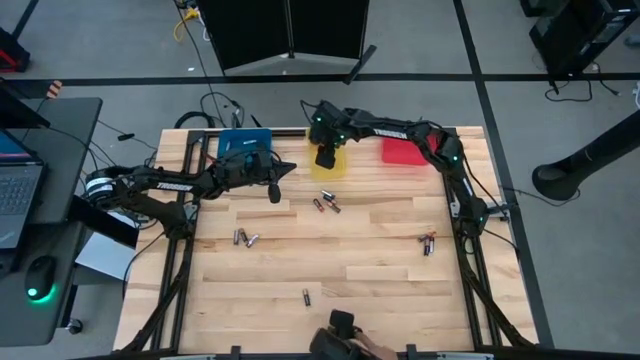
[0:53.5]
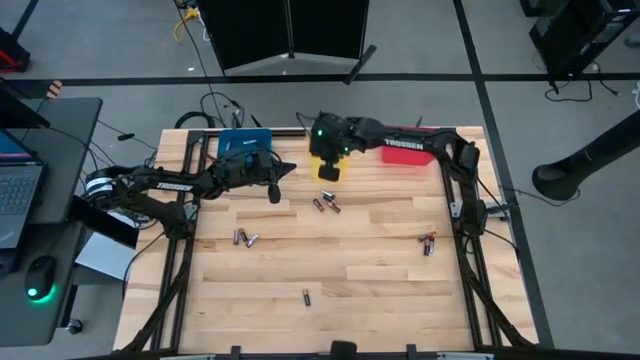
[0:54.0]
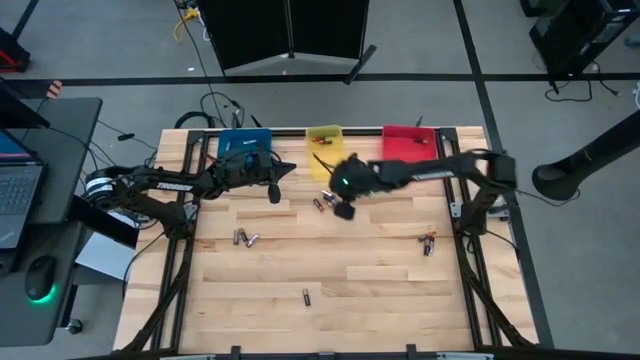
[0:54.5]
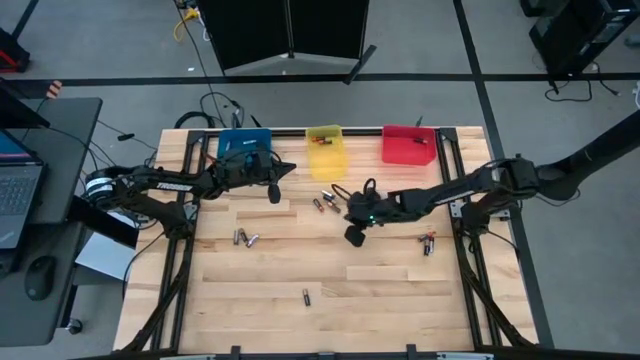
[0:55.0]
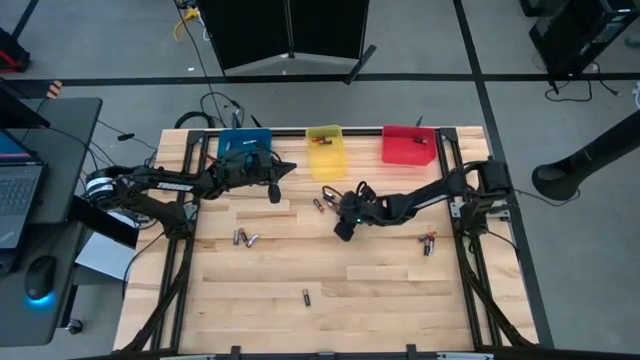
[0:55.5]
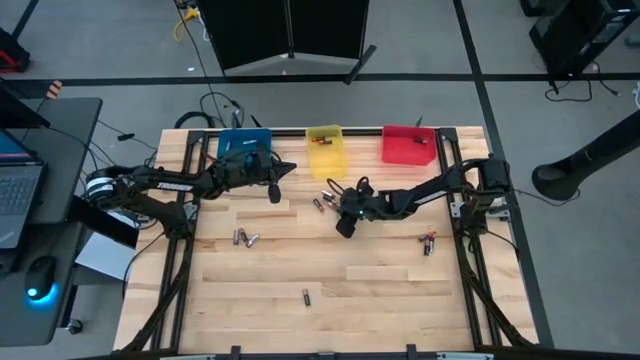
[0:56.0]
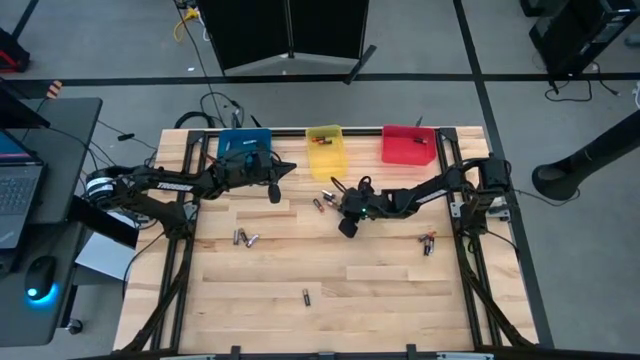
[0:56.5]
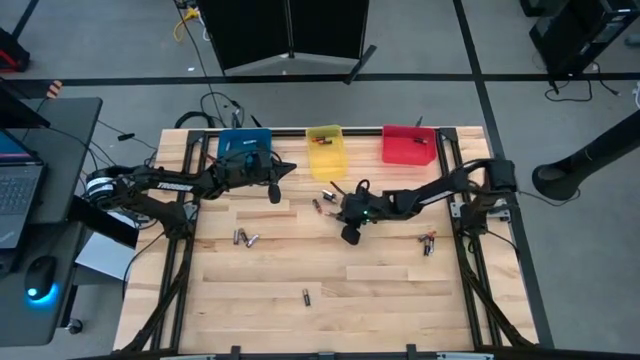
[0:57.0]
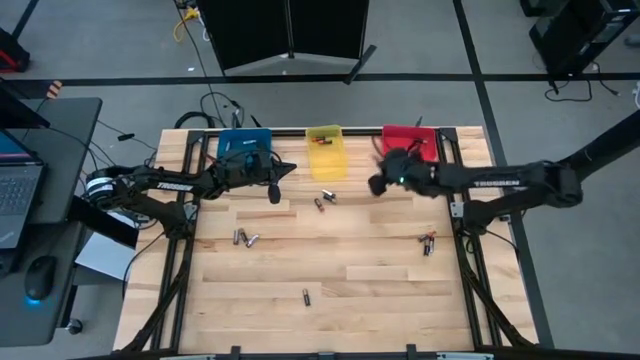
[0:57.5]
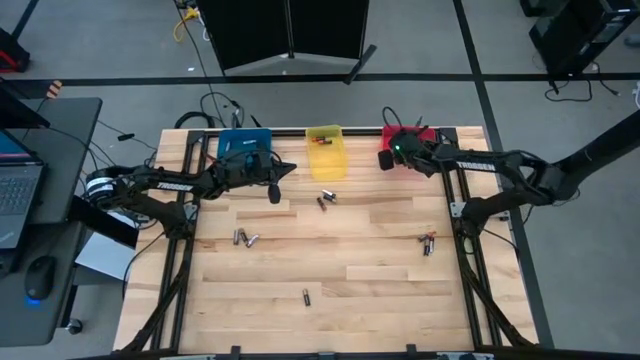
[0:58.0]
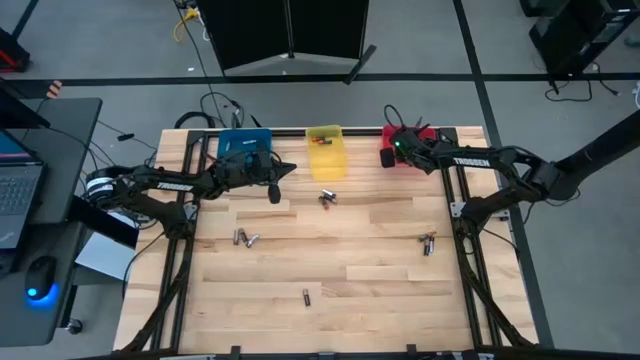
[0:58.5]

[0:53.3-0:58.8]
Task: Sort batteries
Put the black brown battery into the red bin

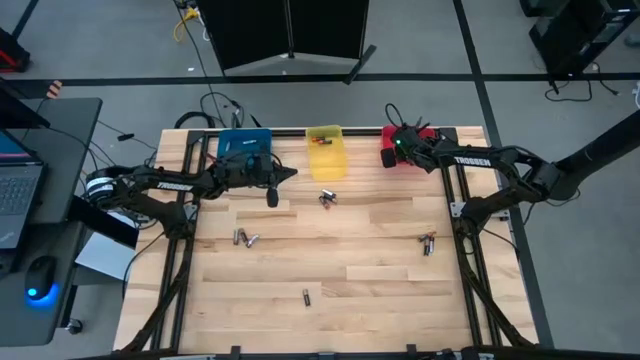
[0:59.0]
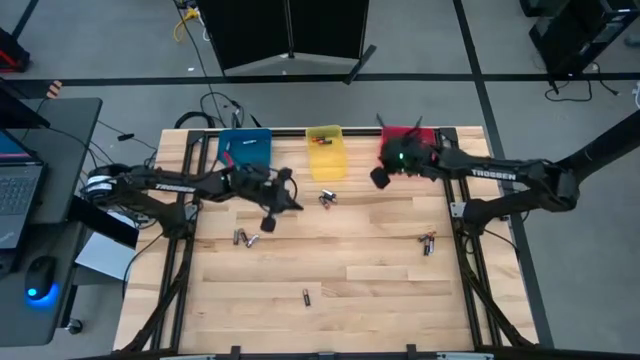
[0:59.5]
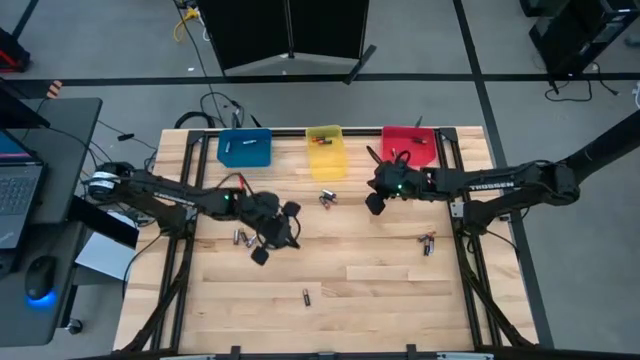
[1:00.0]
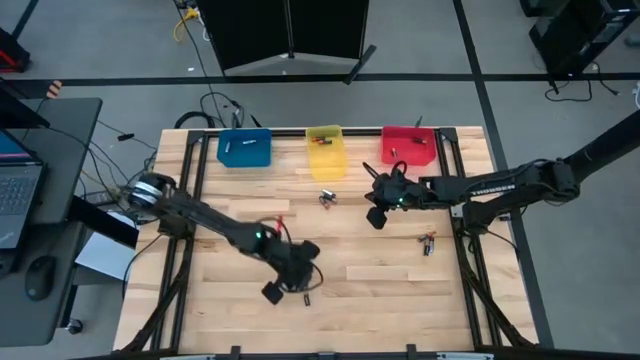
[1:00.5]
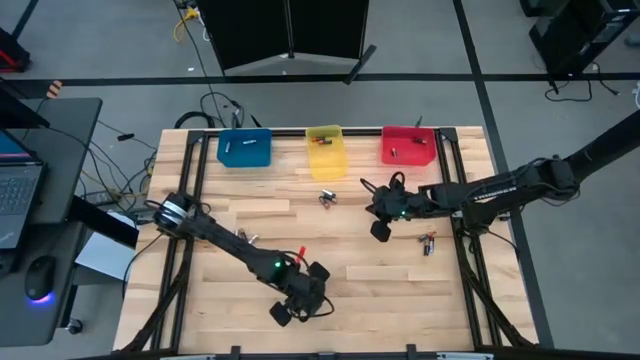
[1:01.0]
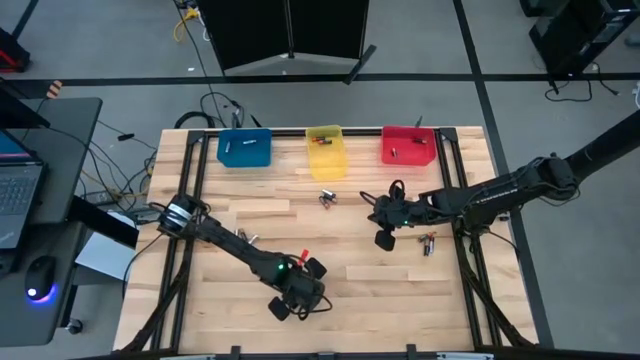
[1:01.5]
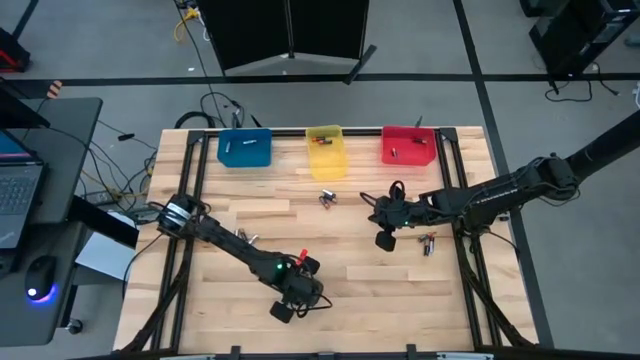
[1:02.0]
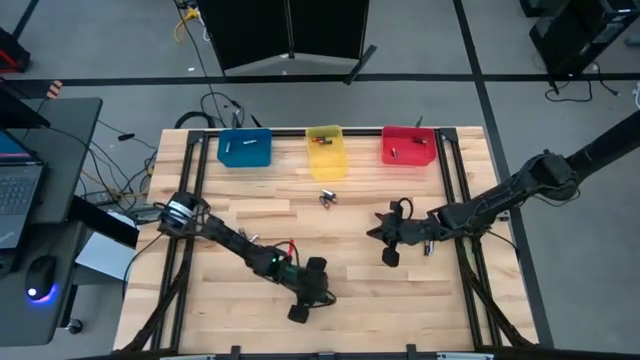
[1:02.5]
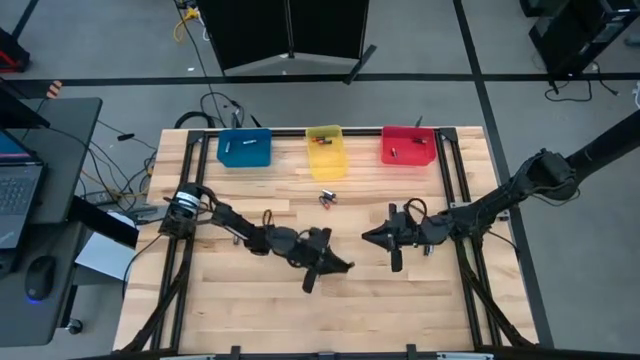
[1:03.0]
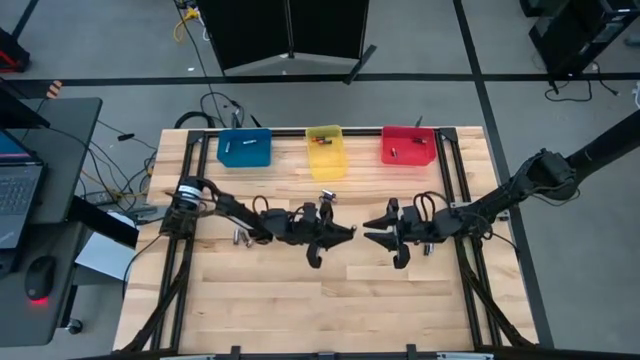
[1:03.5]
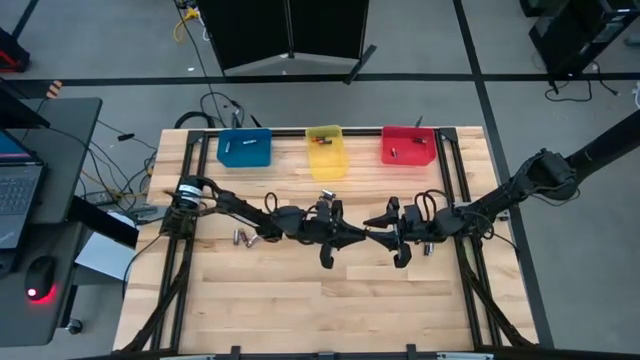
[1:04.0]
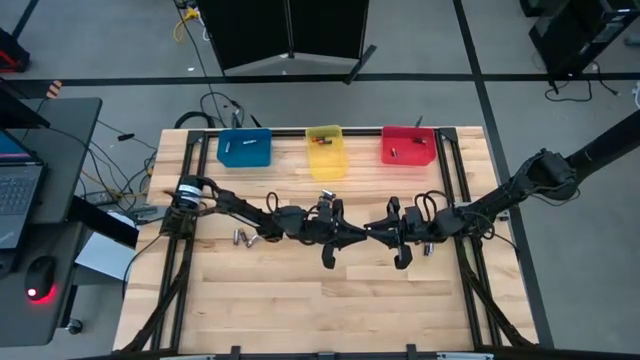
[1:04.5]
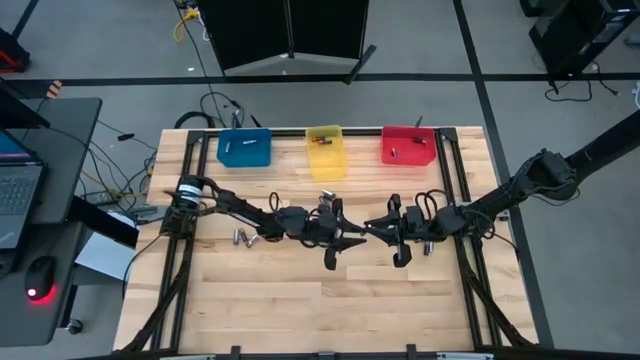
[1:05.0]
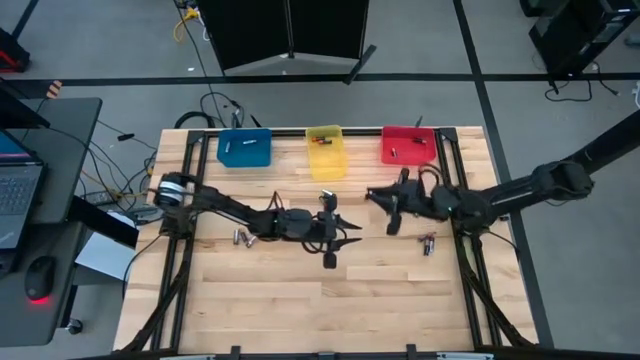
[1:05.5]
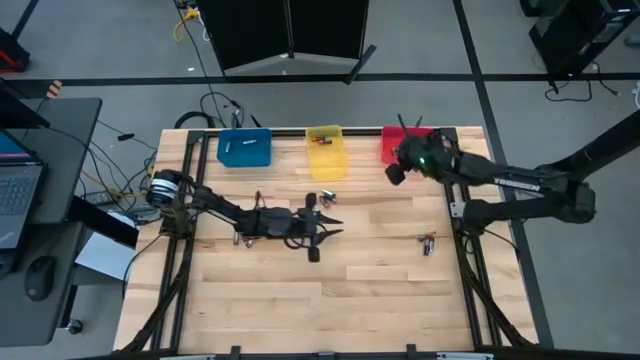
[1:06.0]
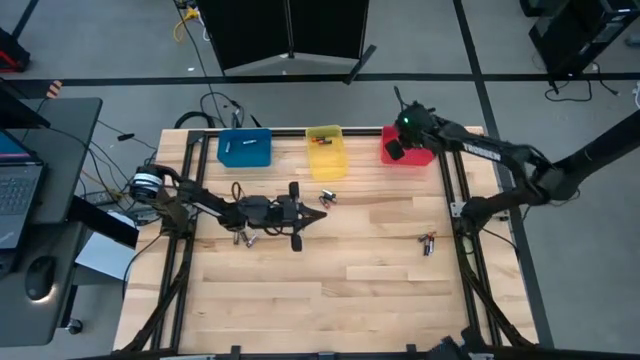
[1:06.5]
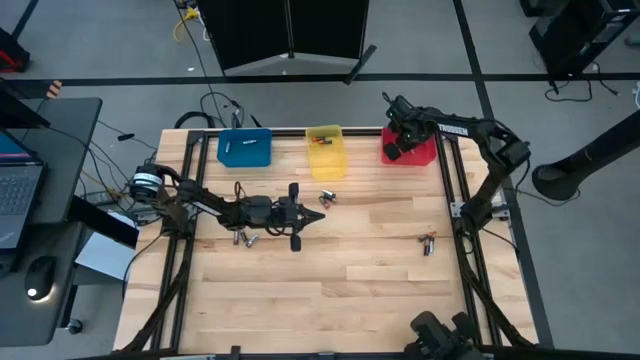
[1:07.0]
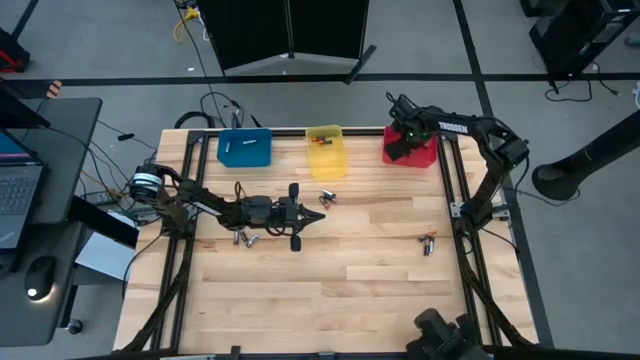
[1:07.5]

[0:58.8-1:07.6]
Put the black brown battery into the red bin

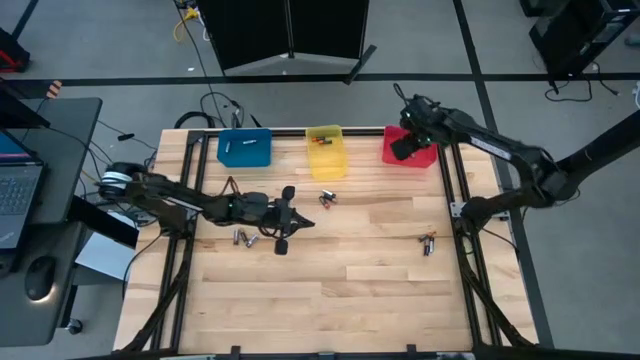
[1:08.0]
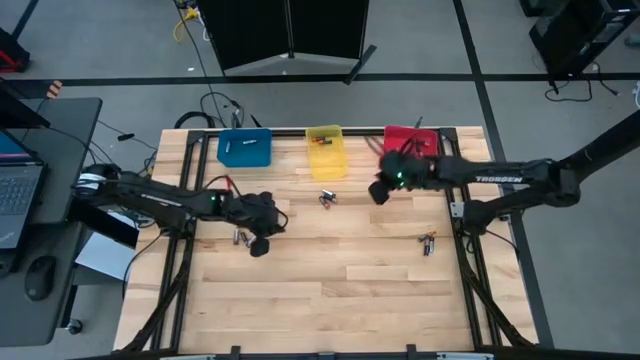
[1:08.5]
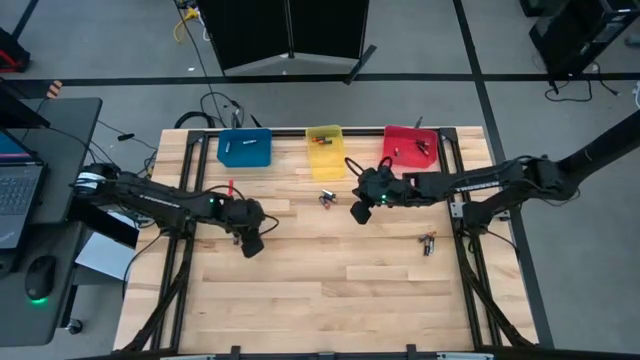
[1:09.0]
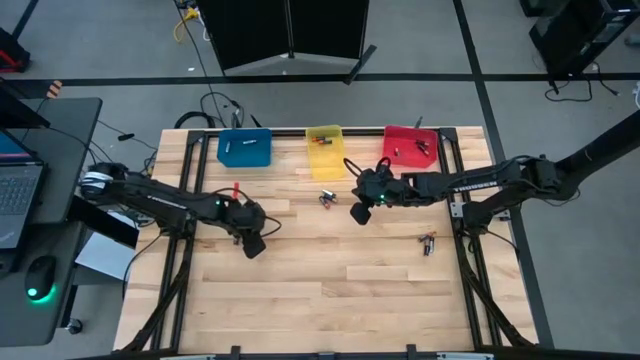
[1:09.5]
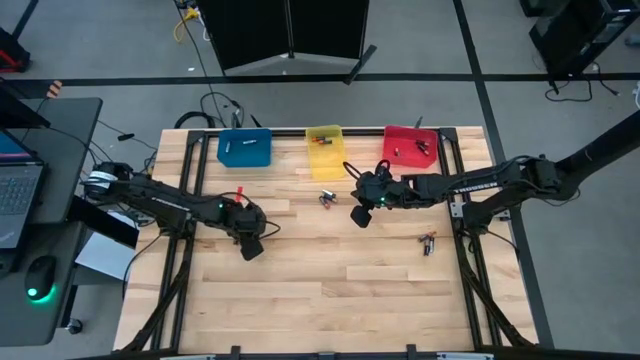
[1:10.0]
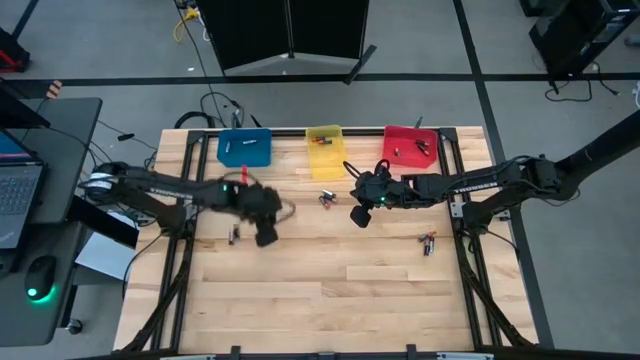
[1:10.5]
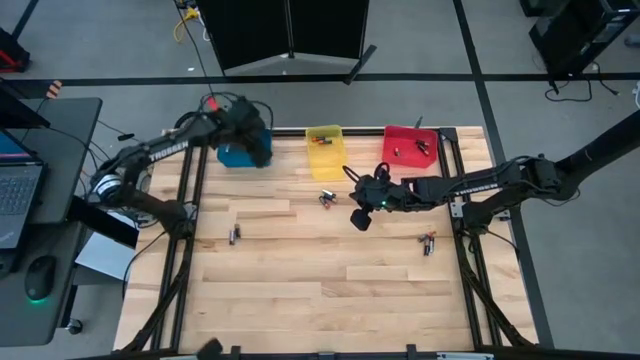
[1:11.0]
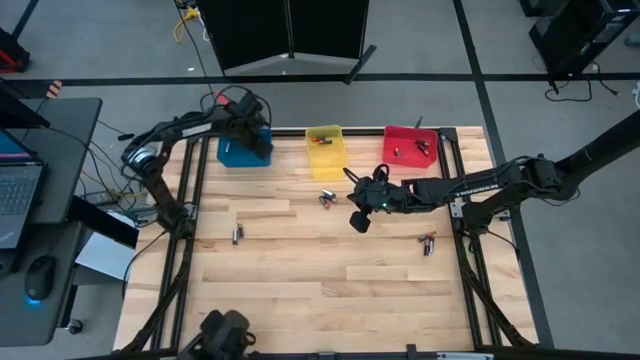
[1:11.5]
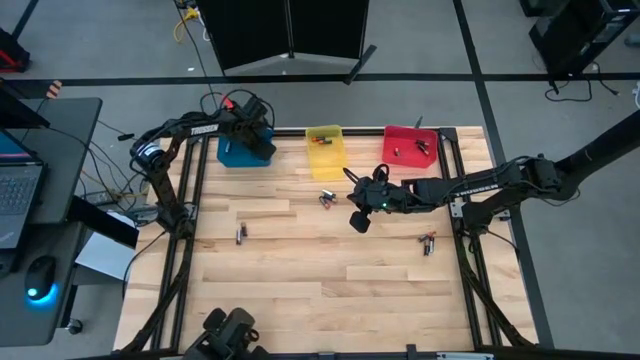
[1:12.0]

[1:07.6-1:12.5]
Put the silver battery into the blue bin

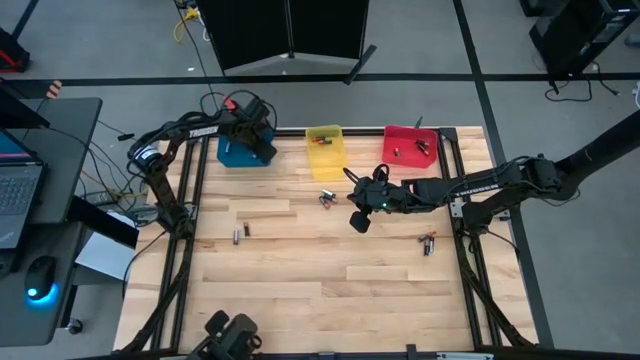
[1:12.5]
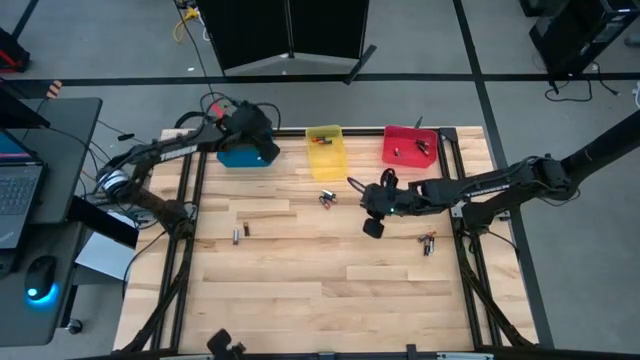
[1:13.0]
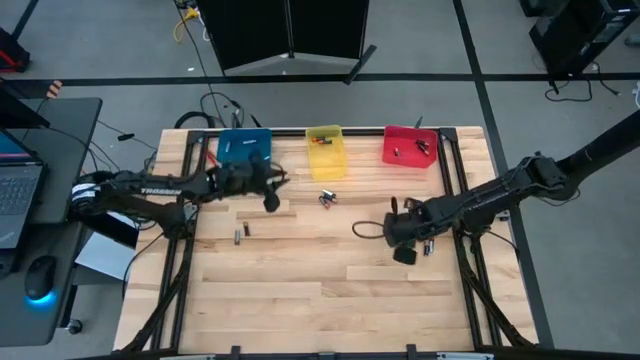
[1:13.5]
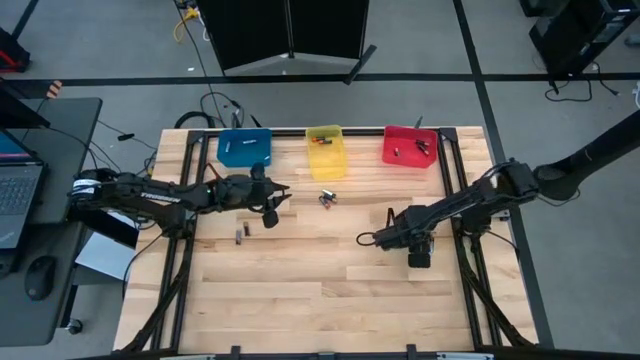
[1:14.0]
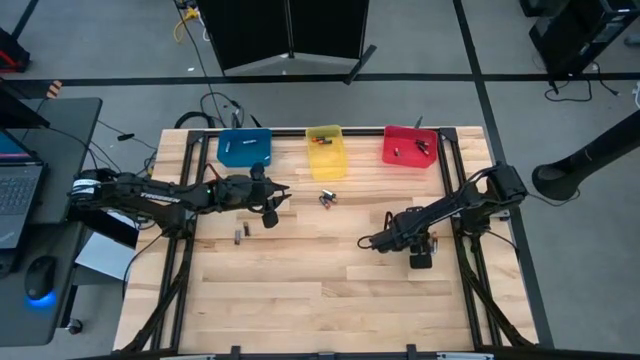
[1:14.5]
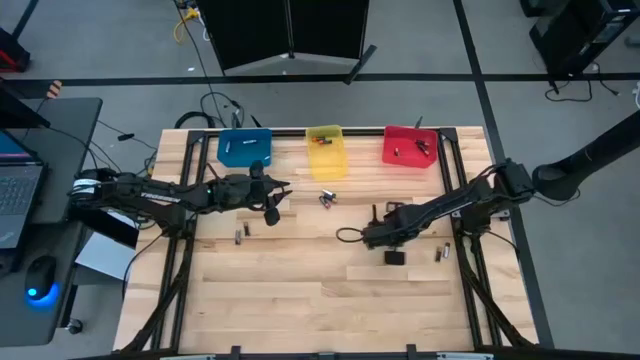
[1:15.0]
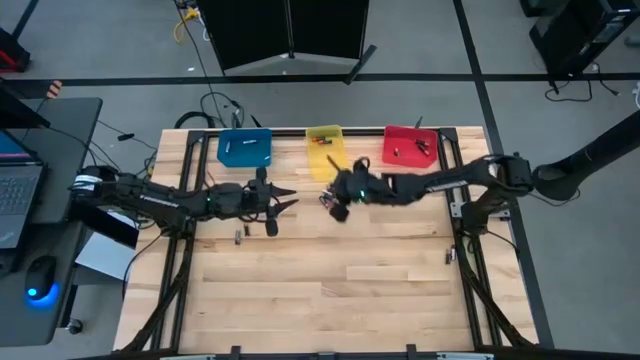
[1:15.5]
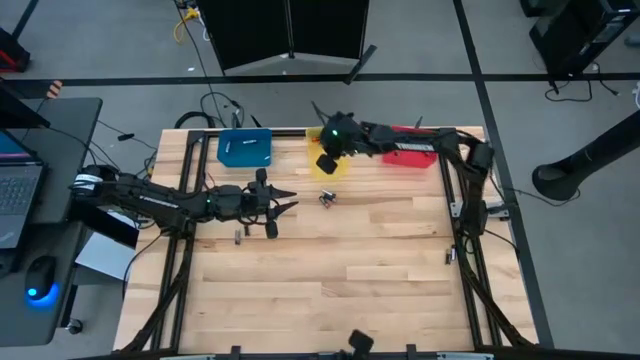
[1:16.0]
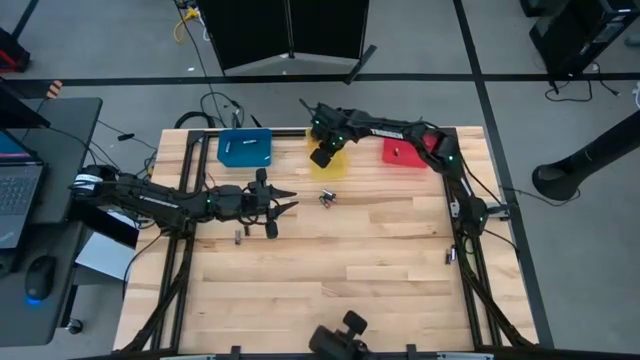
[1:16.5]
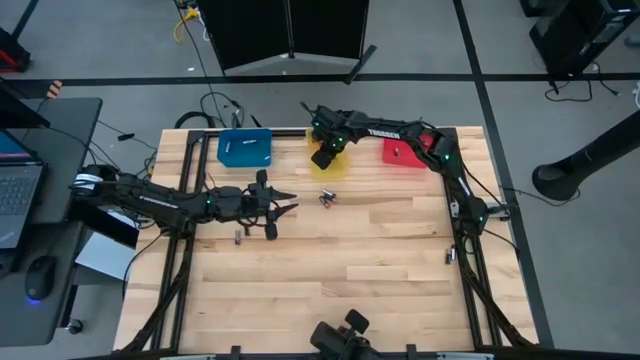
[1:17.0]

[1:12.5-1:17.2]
Put the bottom black red battery into the yellow bin
